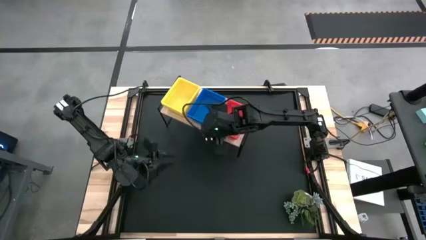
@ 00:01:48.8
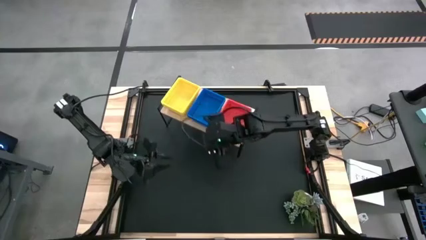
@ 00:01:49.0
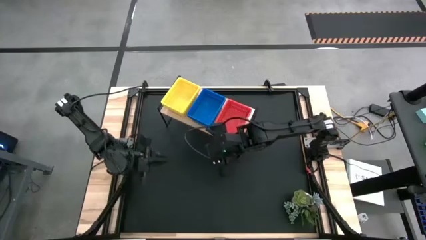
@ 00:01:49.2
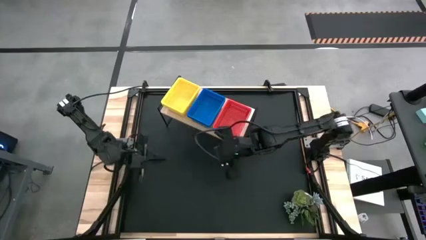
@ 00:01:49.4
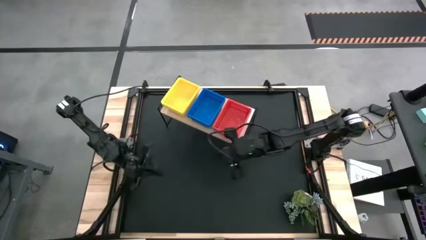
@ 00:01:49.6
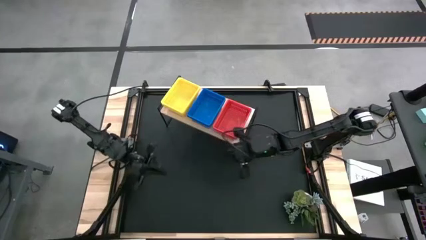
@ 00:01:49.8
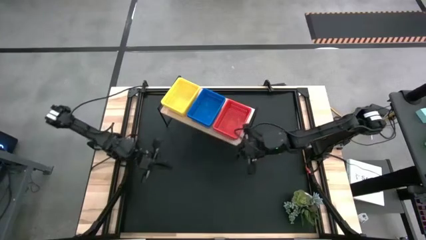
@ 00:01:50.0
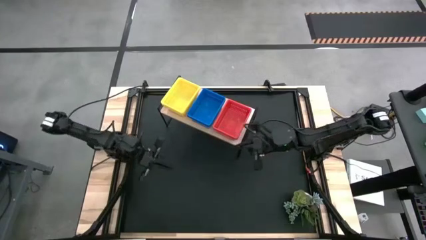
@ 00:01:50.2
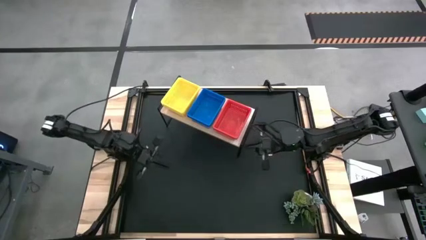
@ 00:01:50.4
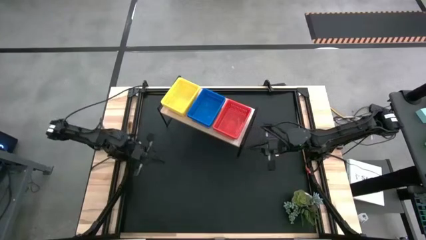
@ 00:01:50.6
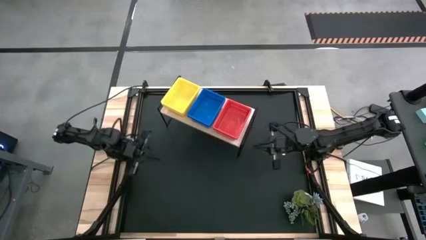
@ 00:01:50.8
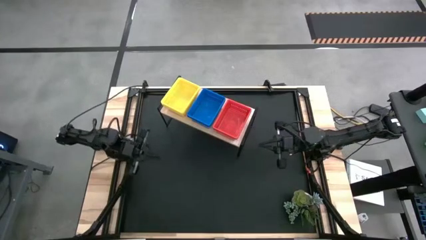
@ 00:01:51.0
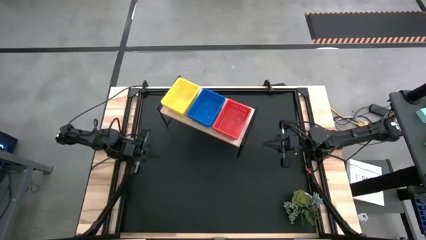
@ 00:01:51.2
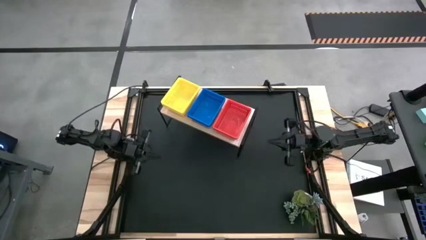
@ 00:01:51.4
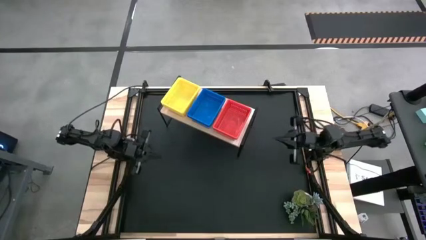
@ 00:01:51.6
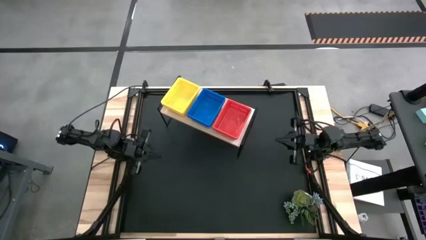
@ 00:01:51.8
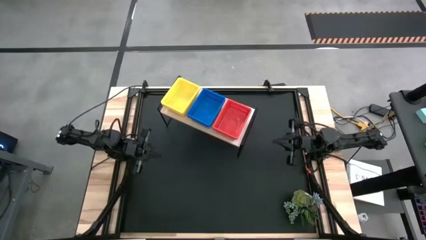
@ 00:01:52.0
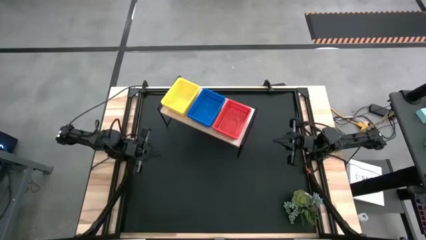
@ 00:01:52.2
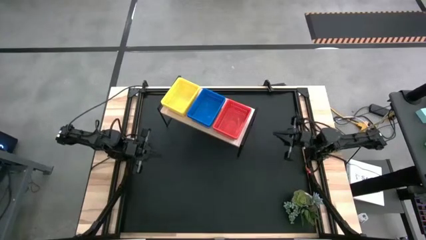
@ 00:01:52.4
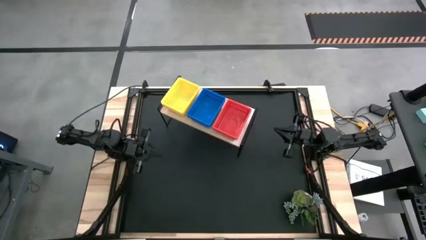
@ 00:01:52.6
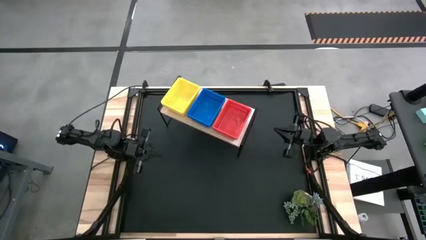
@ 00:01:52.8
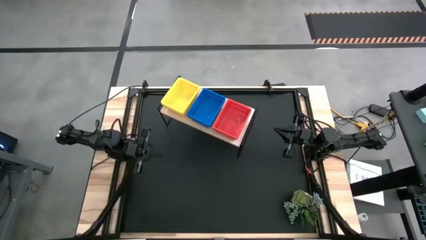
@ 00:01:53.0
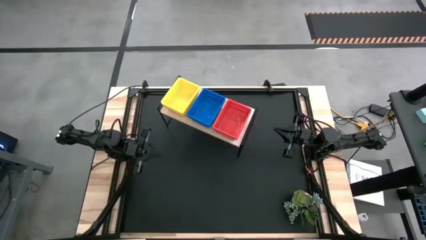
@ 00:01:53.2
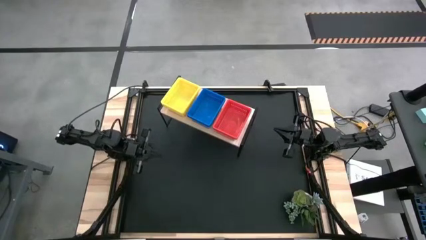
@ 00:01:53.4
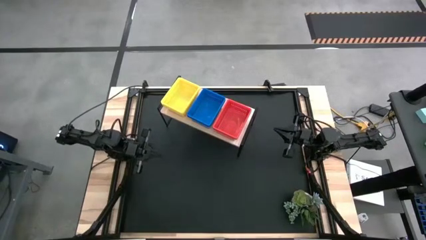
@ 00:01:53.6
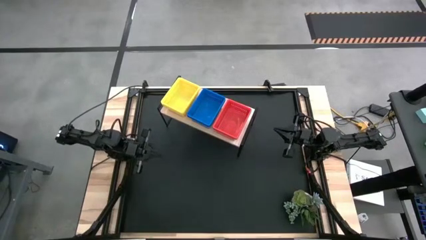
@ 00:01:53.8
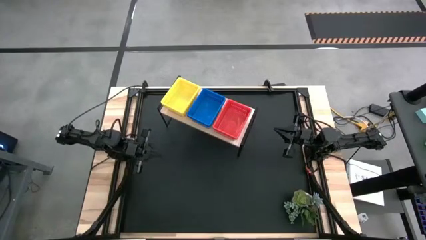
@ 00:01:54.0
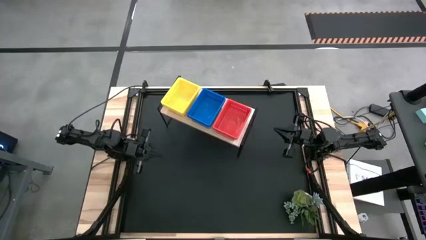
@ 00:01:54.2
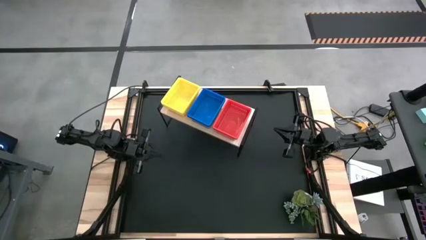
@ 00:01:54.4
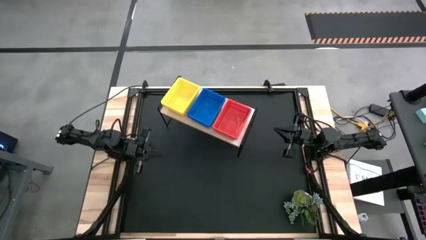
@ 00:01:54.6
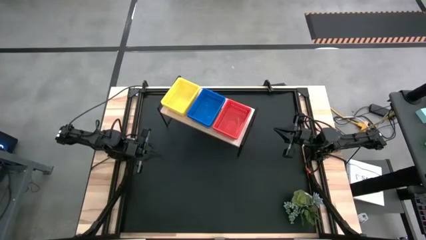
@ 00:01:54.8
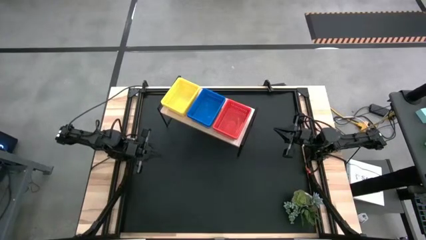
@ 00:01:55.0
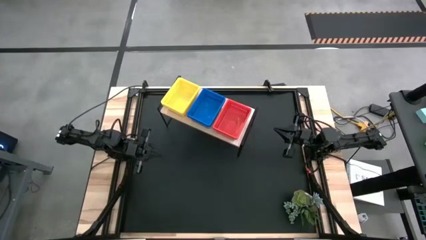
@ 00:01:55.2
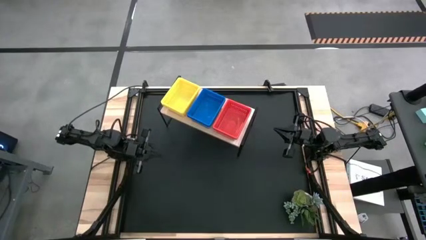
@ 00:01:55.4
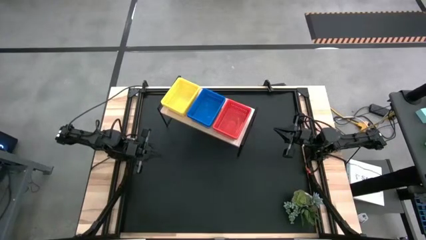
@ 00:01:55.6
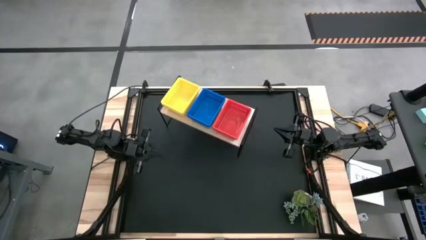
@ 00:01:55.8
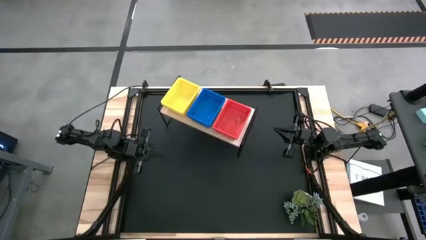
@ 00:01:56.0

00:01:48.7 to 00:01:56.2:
Task: Stack baskets on shelf by color
Return to Home Position

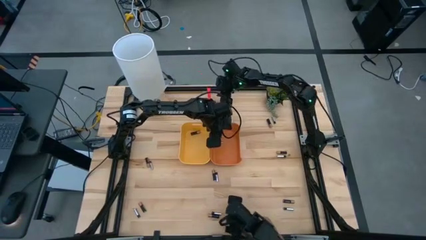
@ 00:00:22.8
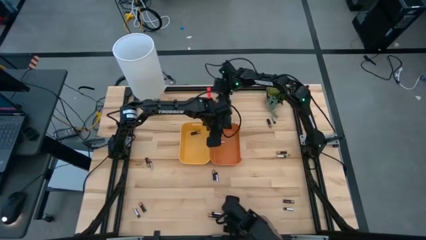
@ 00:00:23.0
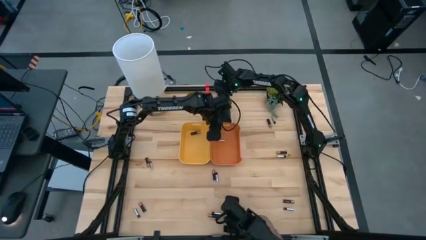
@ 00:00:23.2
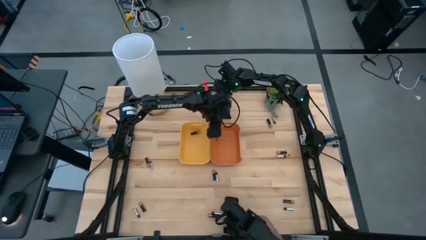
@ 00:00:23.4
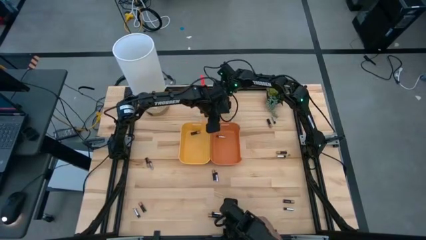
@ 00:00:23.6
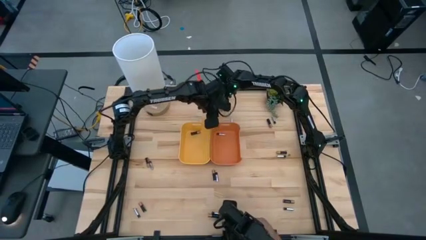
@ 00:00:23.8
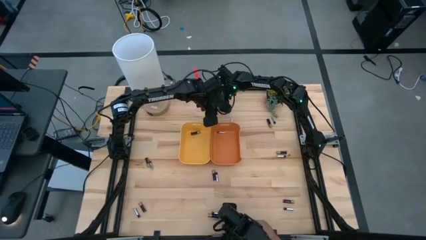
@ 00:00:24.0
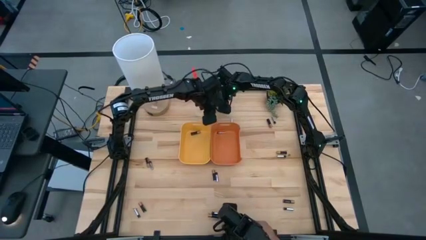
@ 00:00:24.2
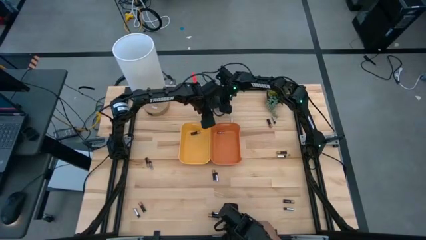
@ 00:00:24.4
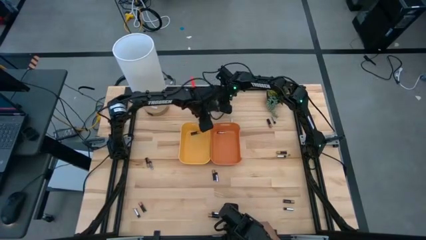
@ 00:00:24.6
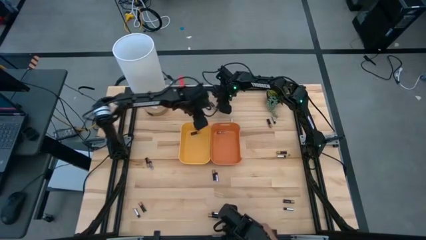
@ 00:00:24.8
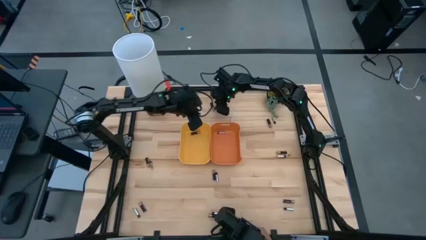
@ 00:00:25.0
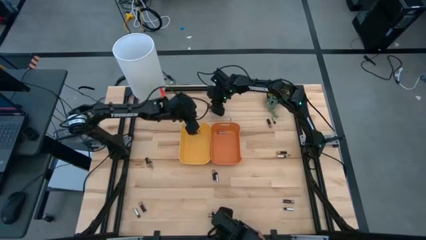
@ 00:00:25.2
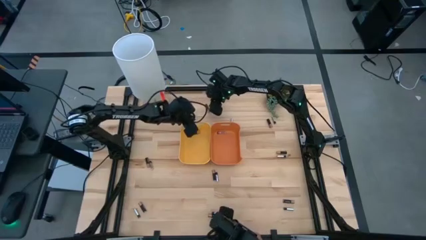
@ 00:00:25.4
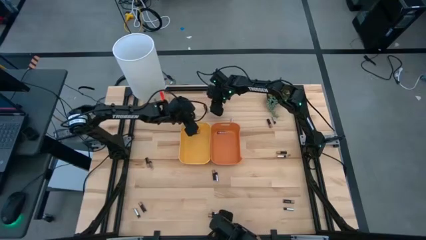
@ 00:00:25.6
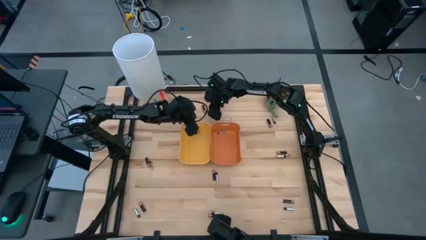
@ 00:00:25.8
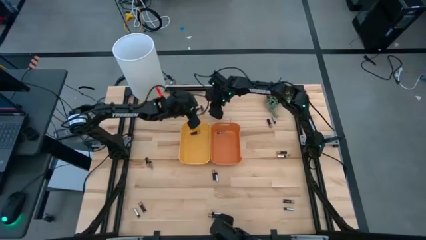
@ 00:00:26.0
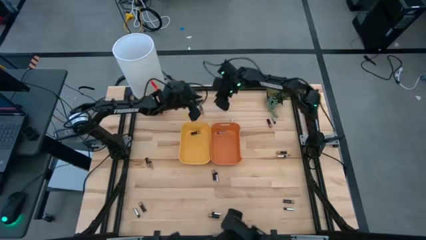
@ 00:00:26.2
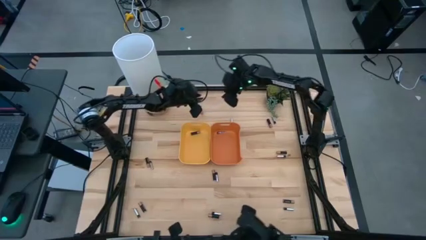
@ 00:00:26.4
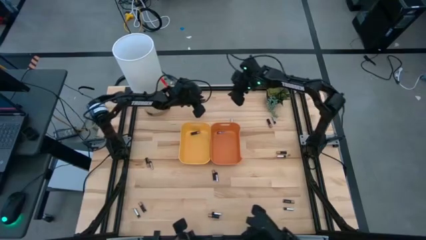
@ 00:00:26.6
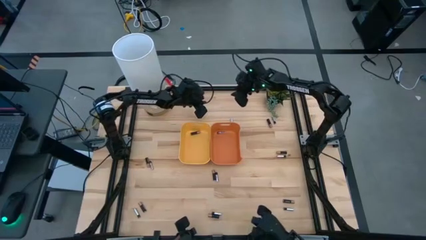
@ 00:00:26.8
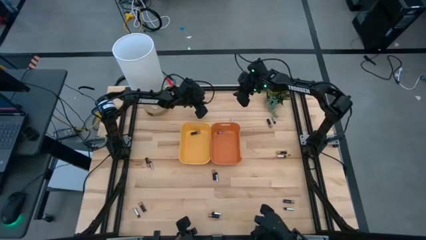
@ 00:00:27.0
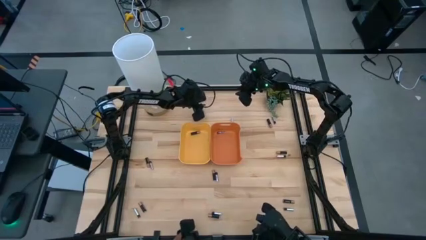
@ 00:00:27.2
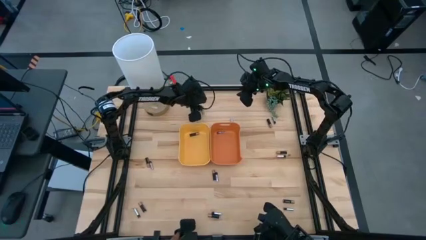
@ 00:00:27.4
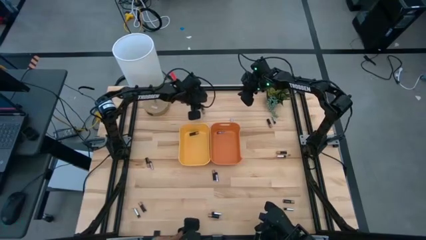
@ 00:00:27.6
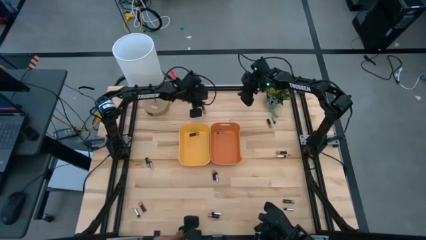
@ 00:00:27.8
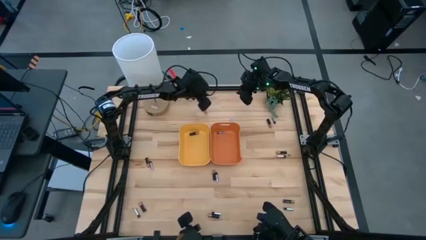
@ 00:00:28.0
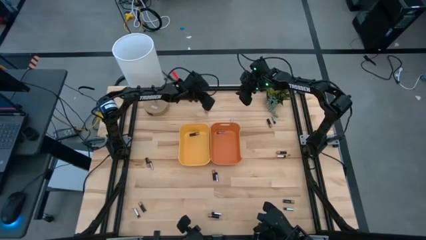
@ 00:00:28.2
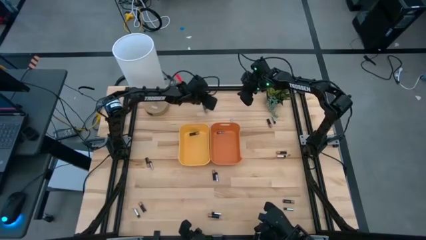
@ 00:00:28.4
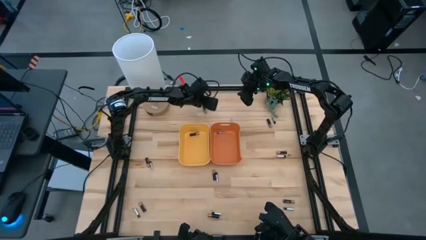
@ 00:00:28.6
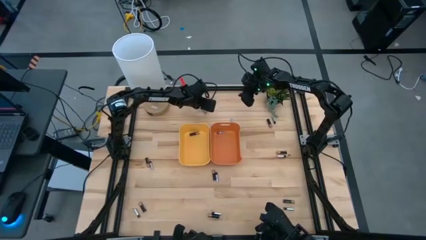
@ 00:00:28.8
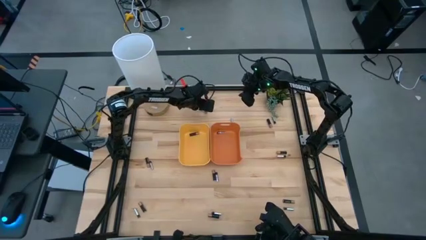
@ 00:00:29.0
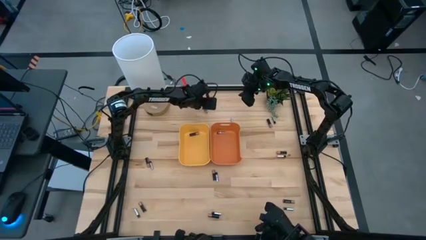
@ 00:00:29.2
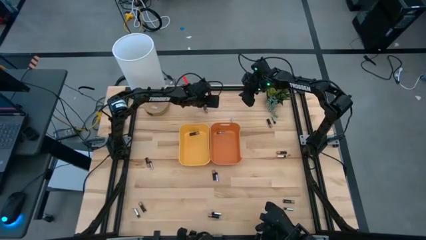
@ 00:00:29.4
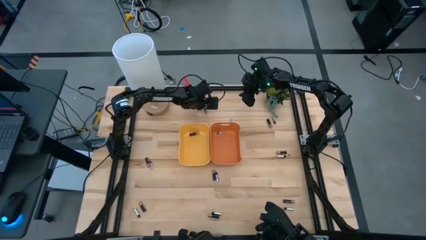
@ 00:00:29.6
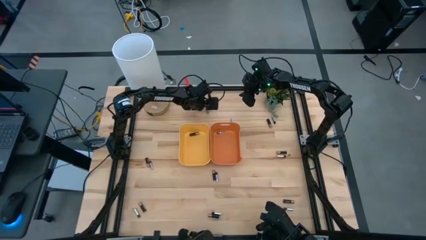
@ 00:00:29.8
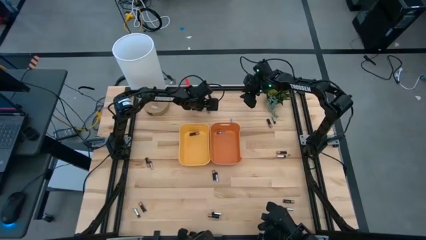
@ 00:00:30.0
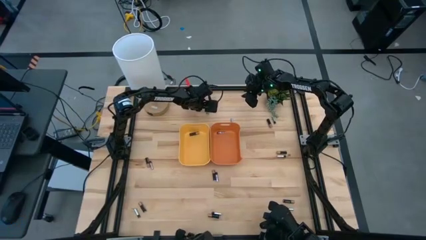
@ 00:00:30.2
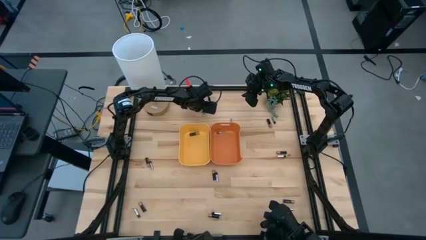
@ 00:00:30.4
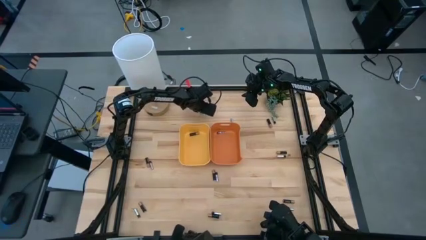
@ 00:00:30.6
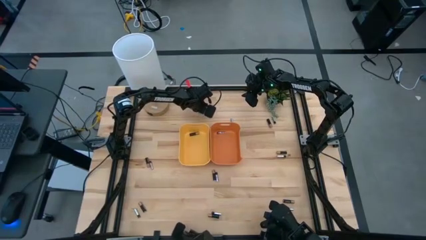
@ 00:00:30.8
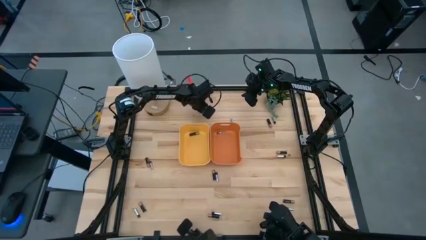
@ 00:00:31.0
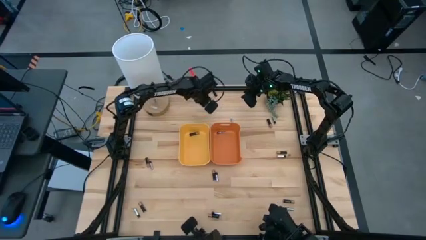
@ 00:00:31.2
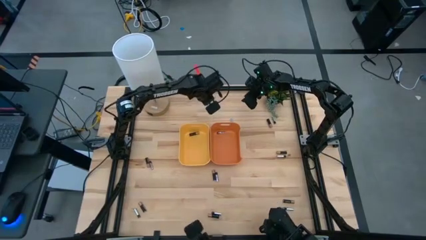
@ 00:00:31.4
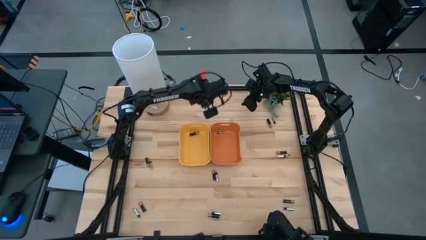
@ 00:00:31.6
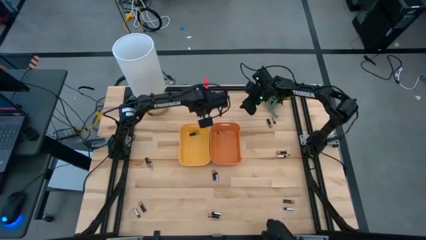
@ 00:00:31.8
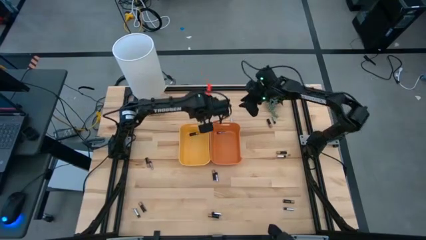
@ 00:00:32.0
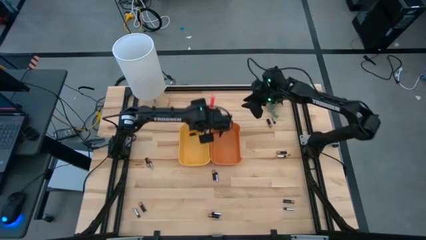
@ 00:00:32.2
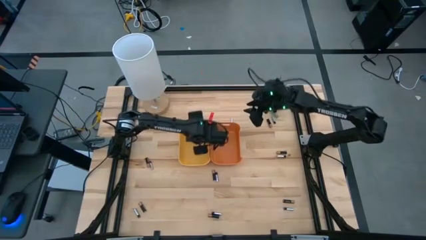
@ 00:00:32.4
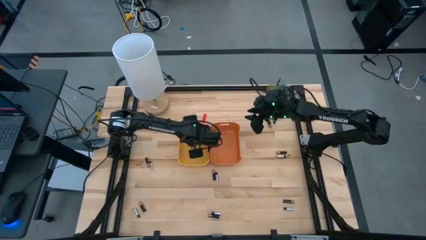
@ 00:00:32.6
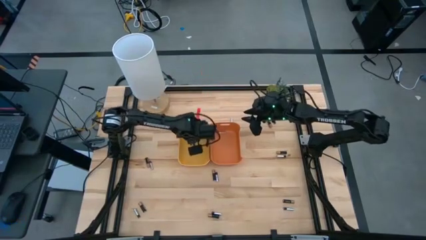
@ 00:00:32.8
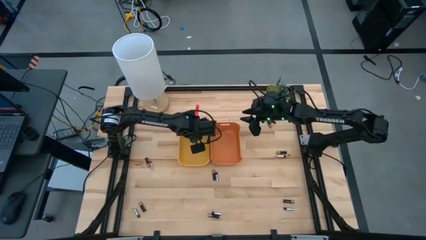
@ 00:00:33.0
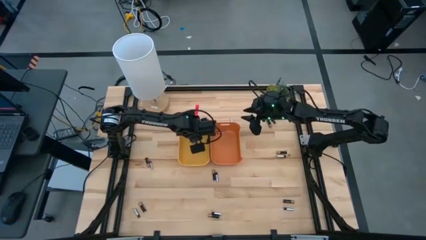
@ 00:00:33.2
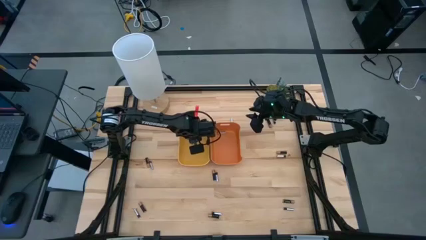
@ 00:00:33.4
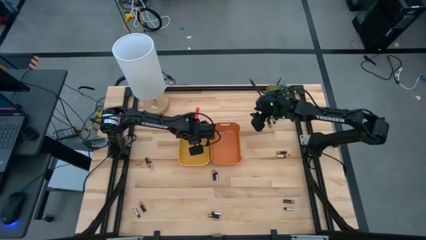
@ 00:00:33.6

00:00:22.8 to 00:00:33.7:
Task: Sort batteries
Put the top center black battery into the yellow bin
